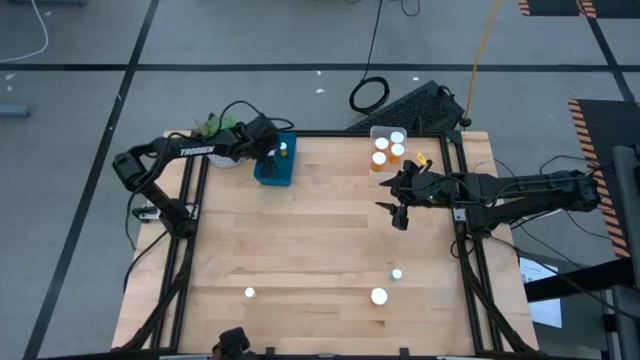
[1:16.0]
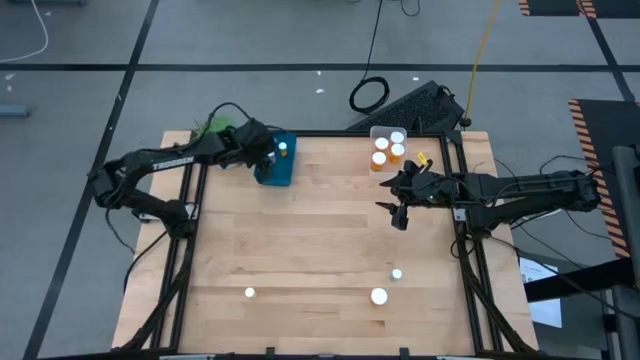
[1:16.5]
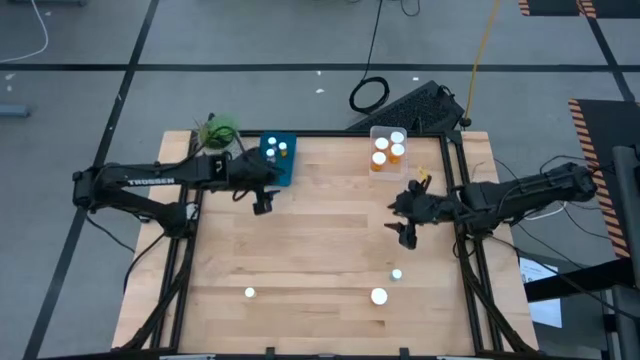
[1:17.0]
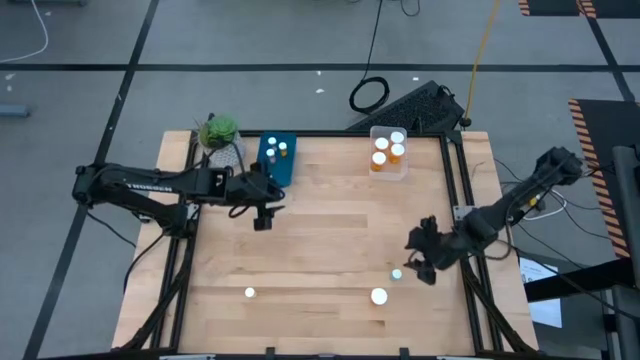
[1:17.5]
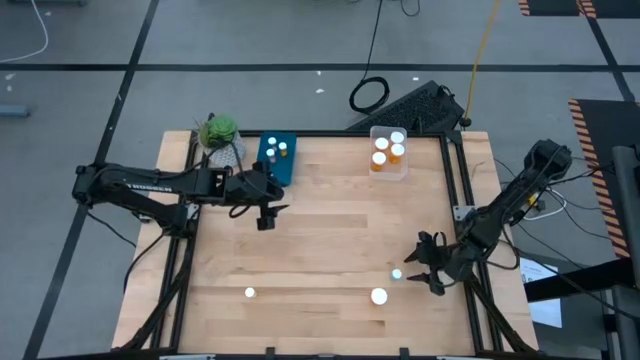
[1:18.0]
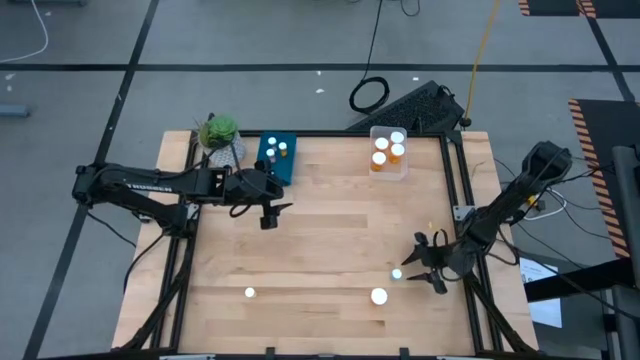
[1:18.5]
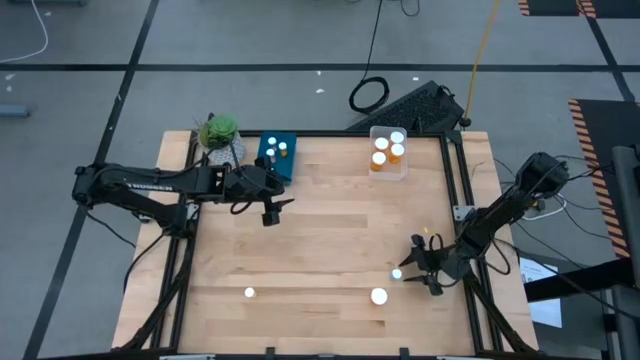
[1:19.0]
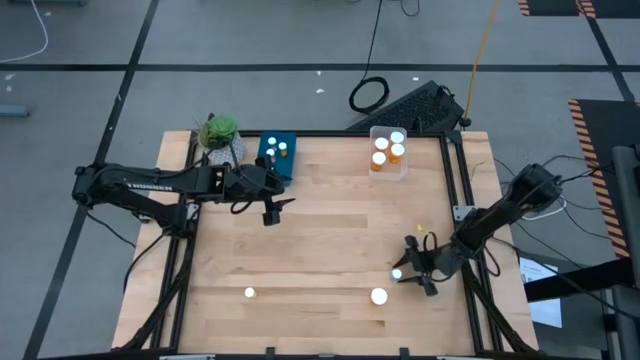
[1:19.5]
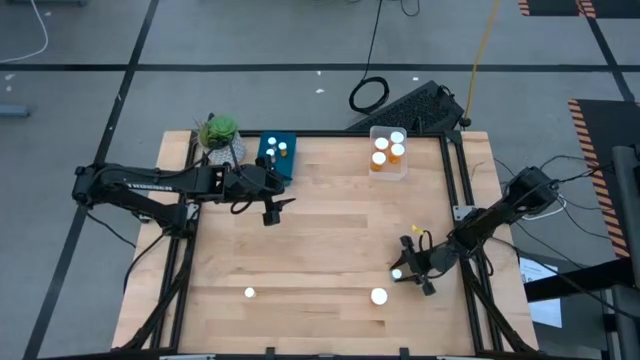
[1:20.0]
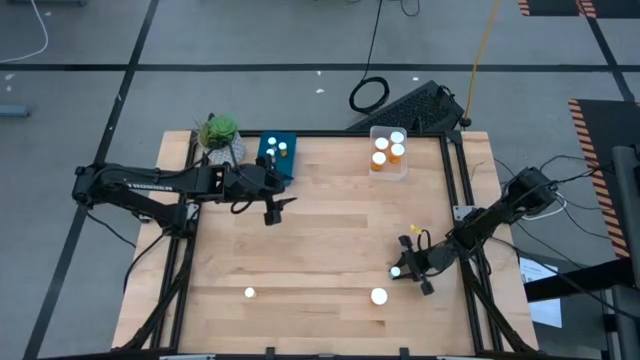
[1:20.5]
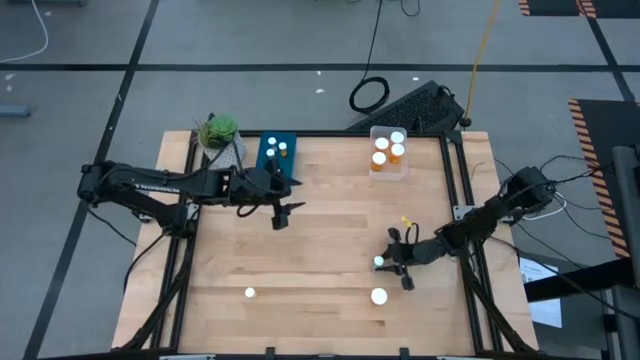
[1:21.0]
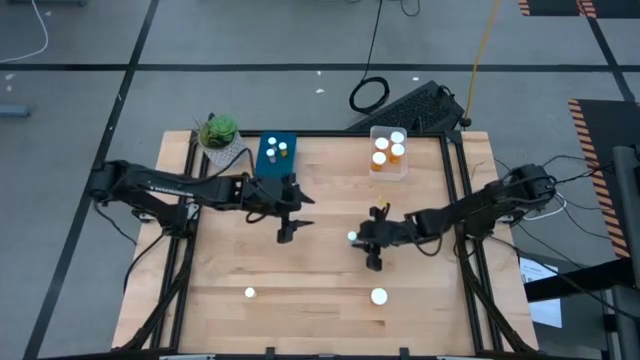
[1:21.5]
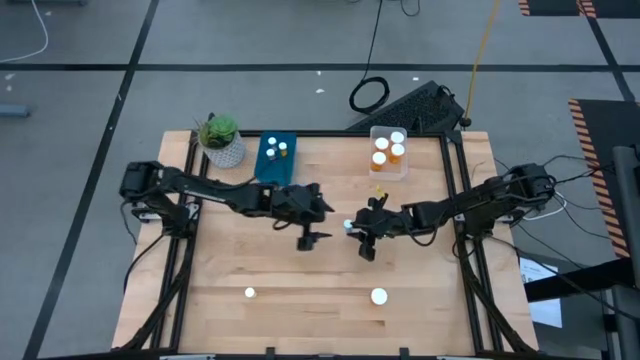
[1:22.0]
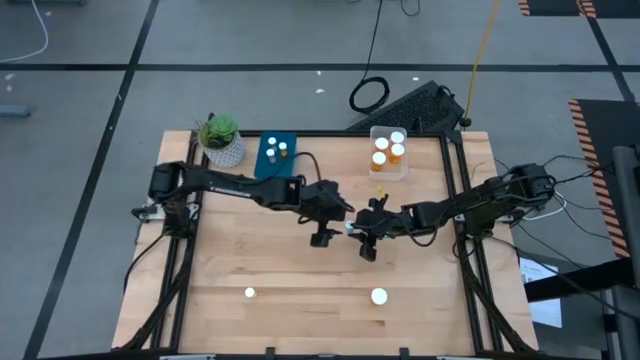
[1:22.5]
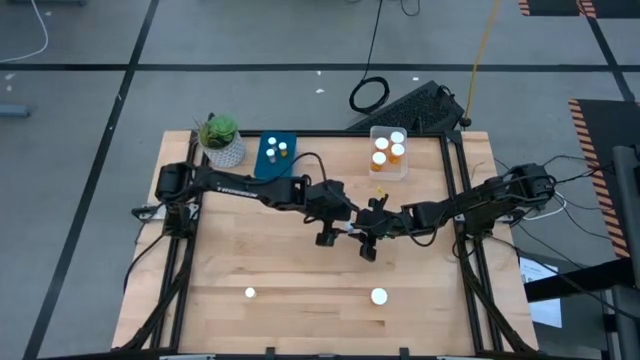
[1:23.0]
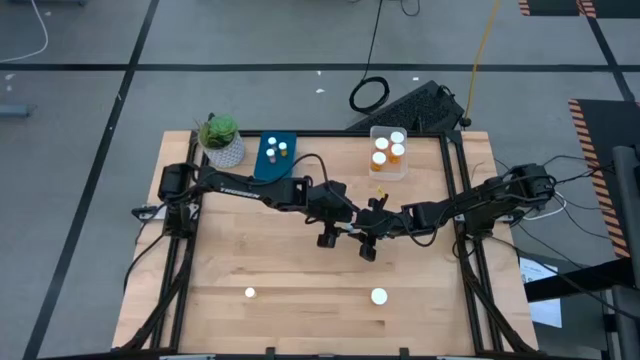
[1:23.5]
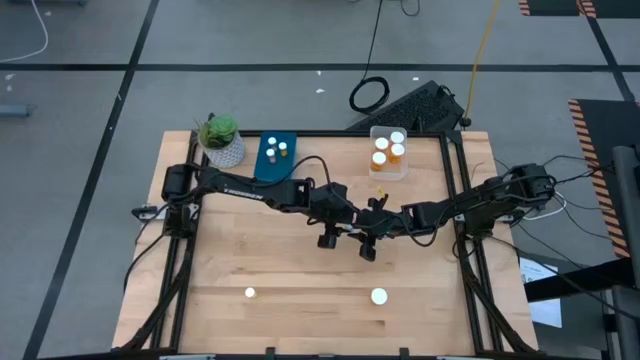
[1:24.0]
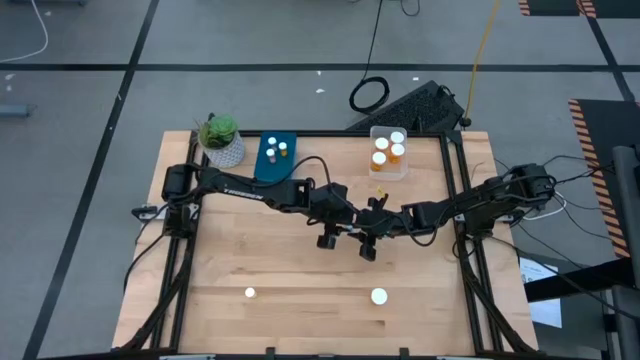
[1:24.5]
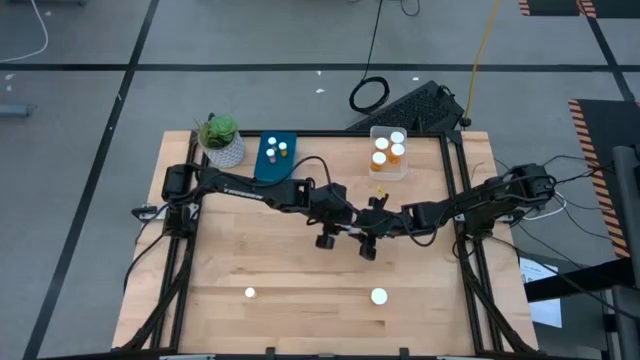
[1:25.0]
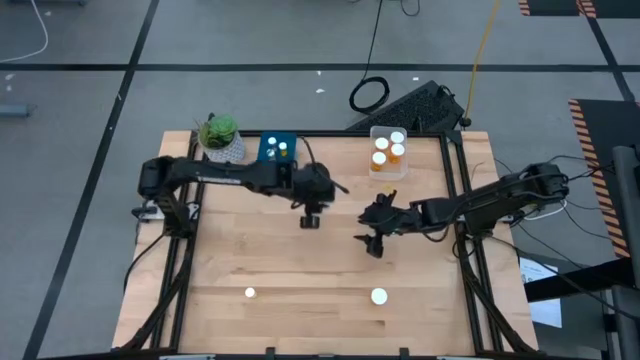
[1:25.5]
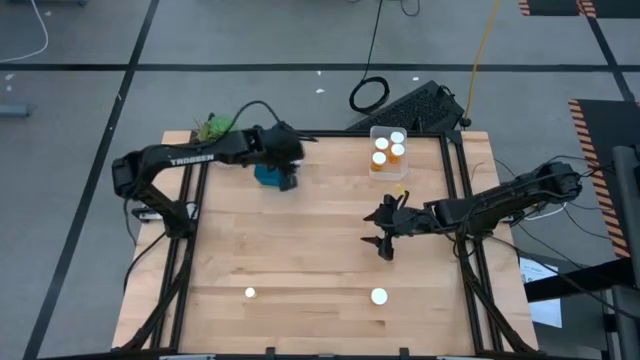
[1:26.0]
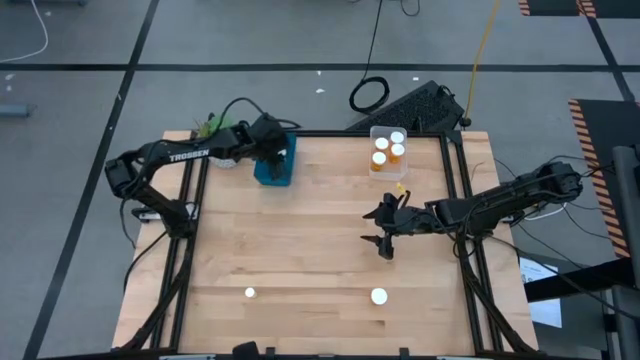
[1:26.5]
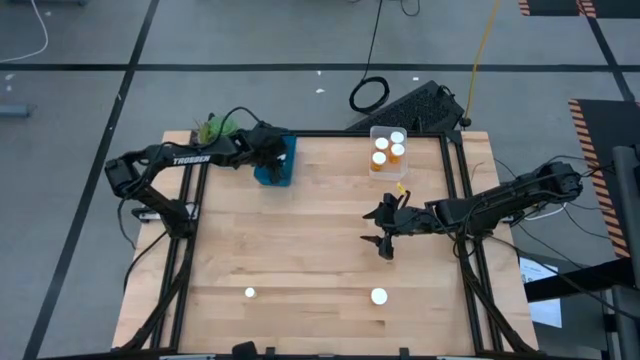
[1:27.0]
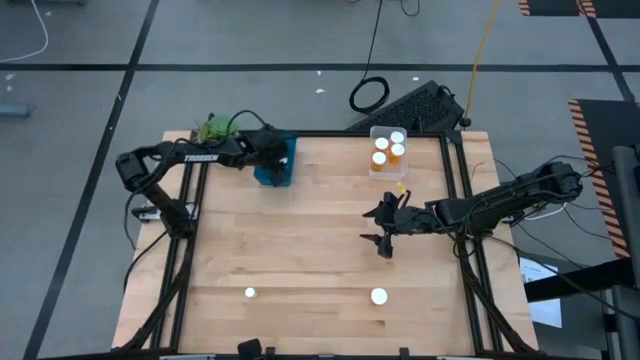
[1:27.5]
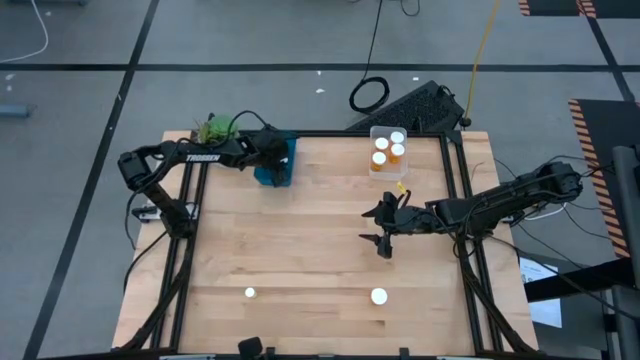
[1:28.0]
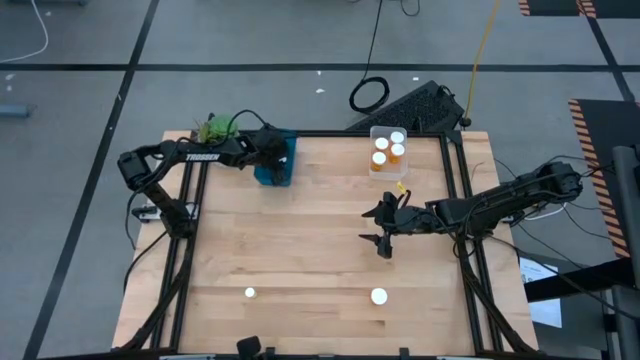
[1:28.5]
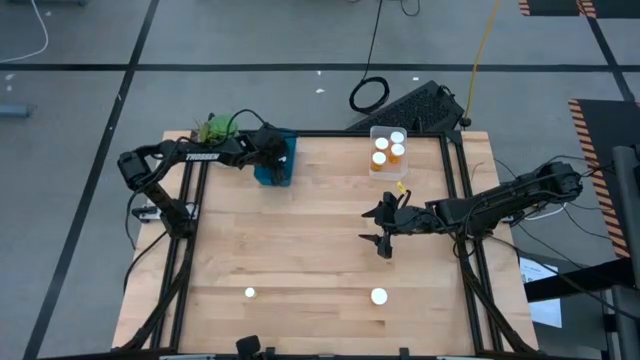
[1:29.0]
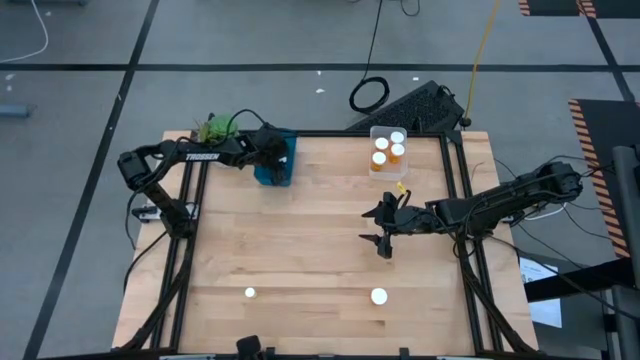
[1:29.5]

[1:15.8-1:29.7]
Task: Pick and place medicine bottles into bin by pill shape (circle, oval)
Put the light blue bottled tablets into the blue bin

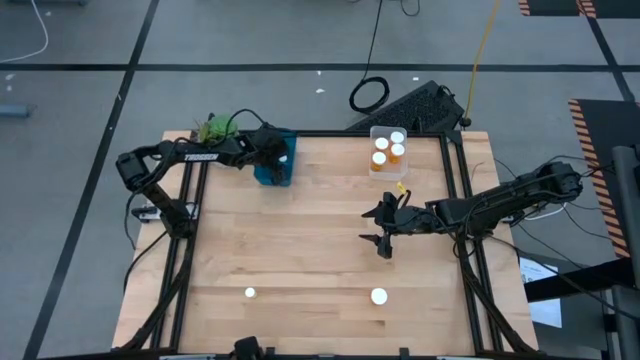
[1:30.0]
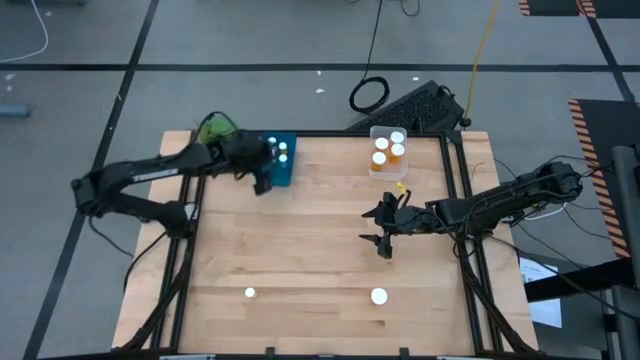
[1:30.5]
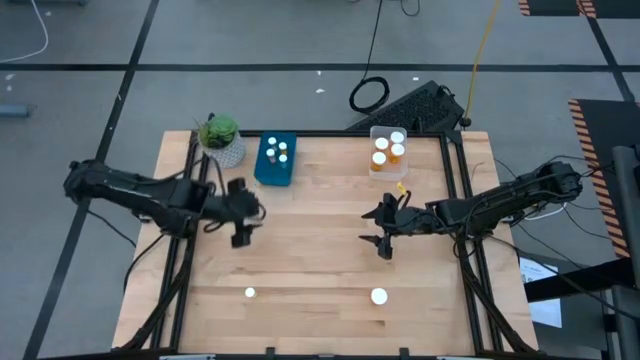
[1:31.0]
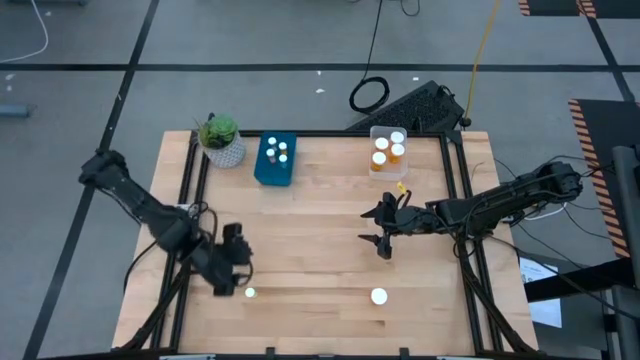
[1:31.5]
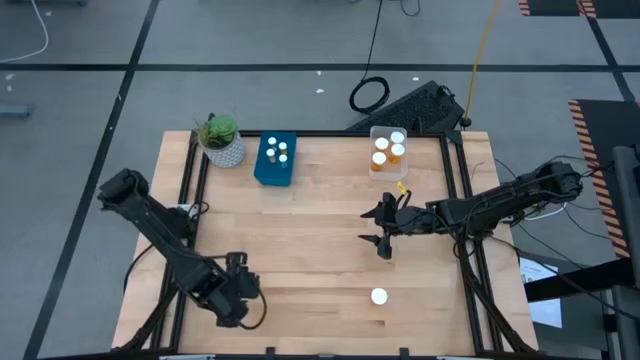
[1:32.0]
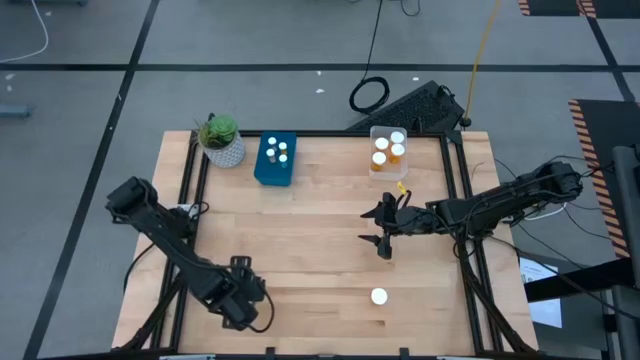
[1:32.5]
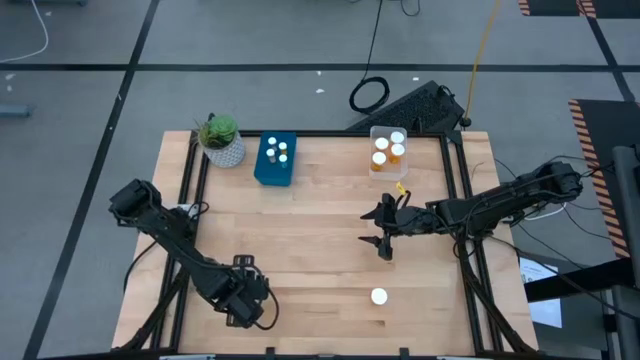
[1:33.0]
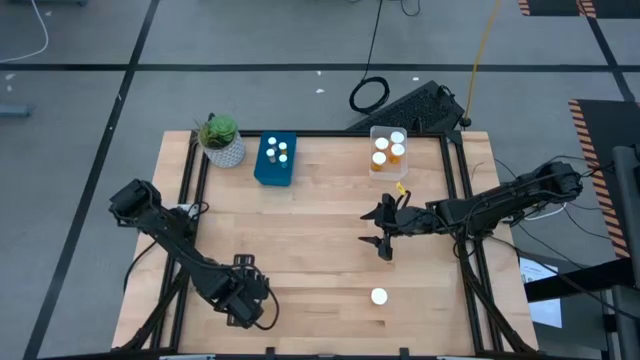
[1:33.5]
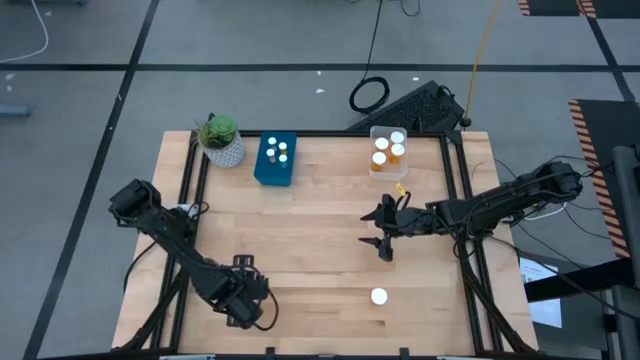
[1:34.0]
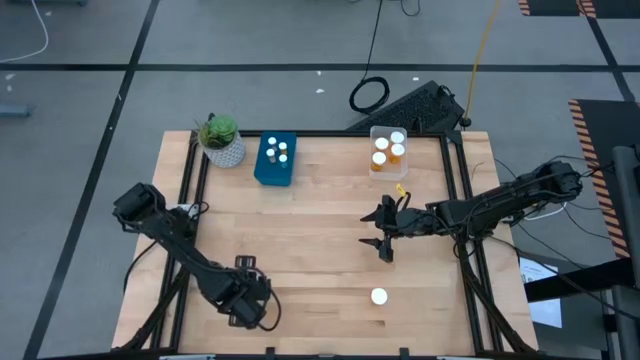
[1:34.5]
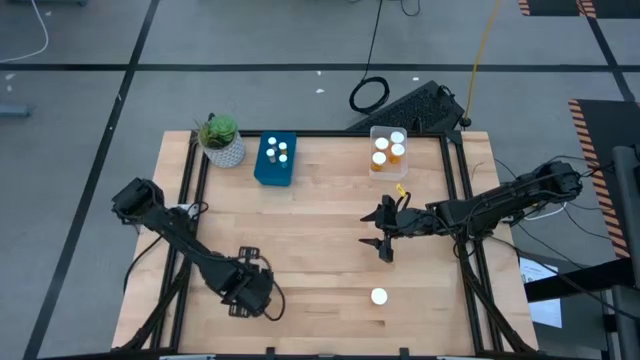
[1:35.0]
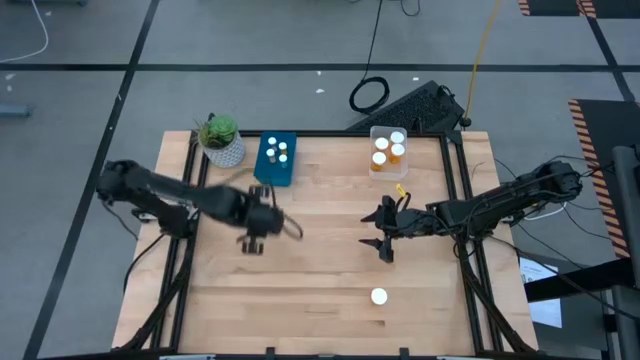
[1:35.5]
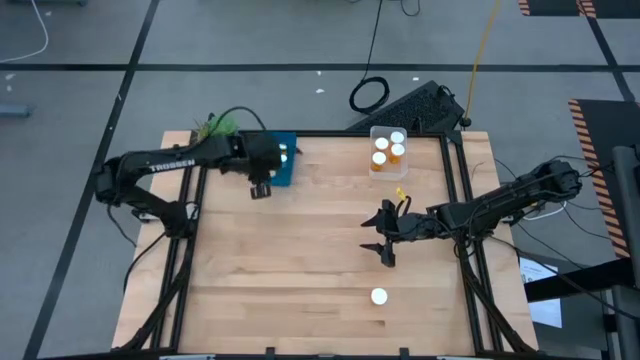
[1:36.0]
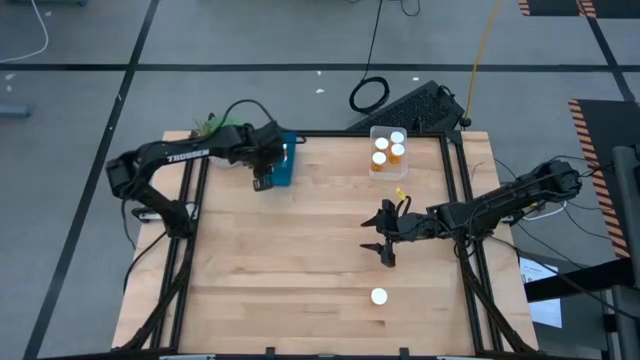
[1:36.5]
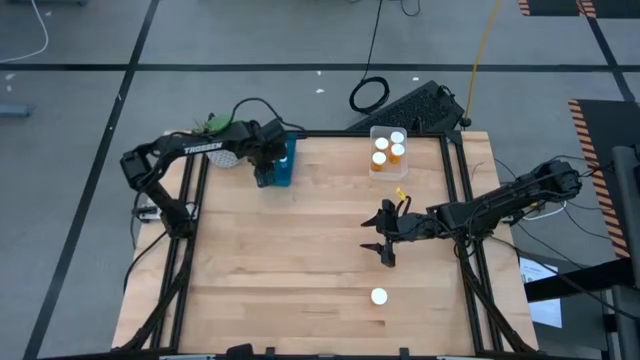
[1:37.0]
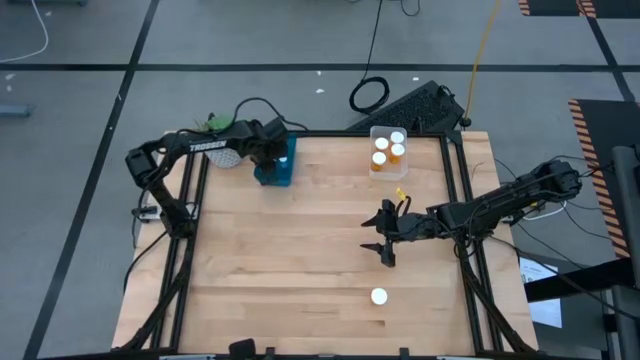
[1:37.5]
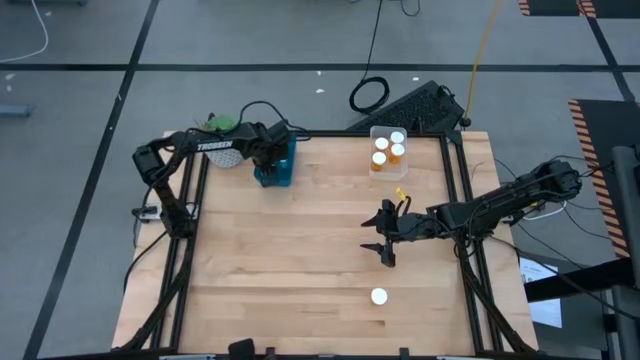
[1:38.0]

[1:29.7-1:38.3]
Put the yellow bottled tablets into the blue bin
